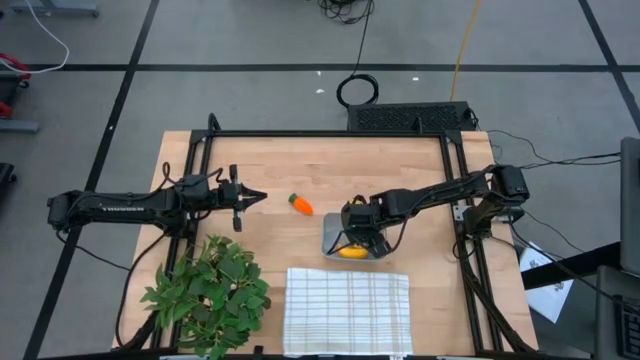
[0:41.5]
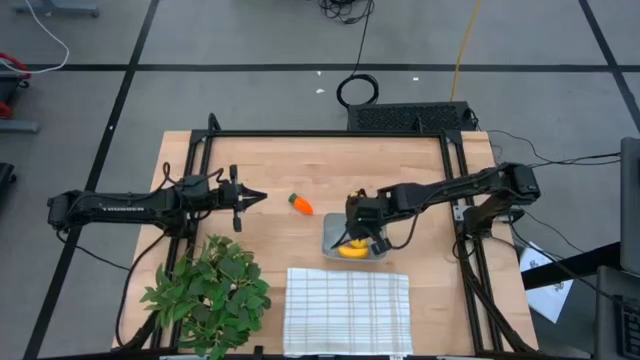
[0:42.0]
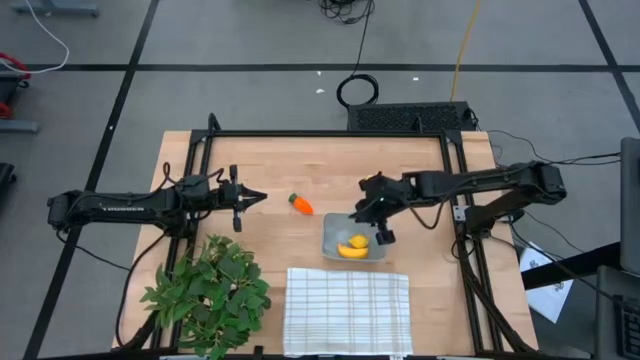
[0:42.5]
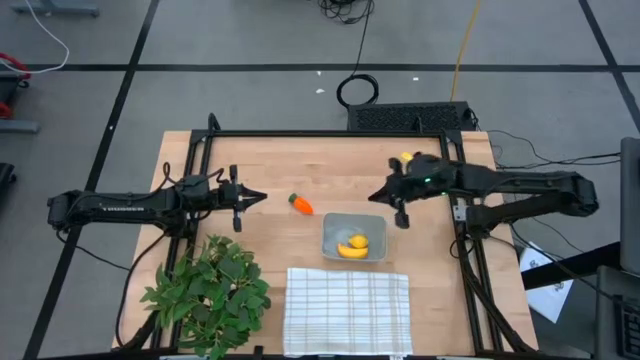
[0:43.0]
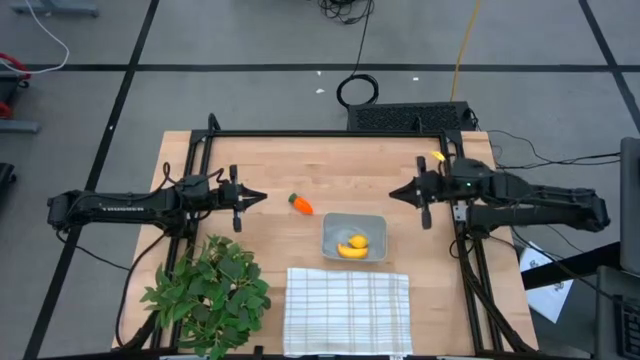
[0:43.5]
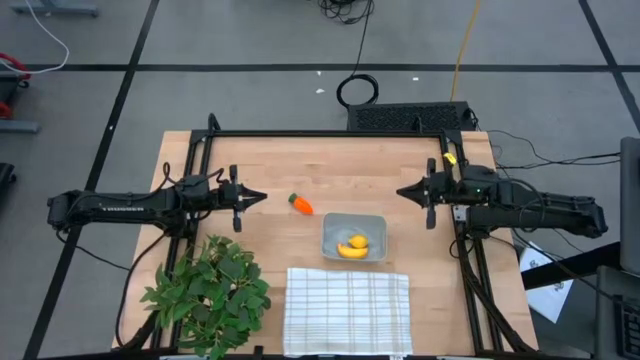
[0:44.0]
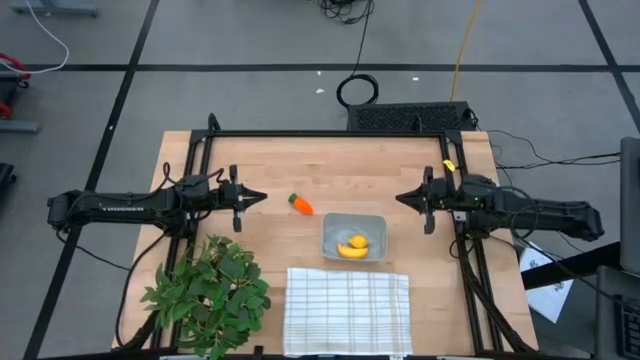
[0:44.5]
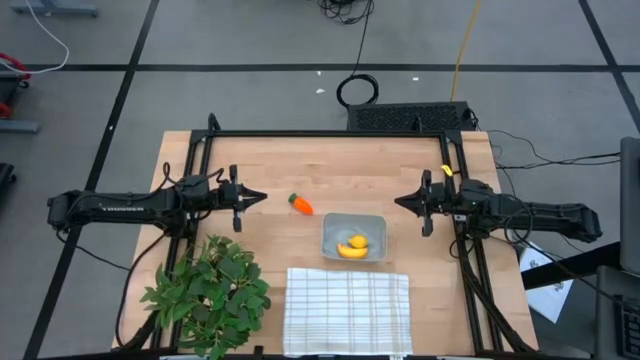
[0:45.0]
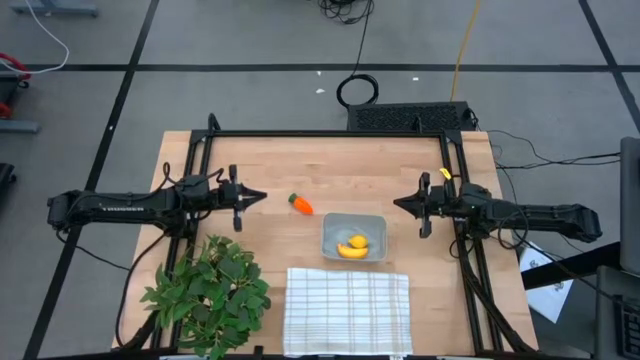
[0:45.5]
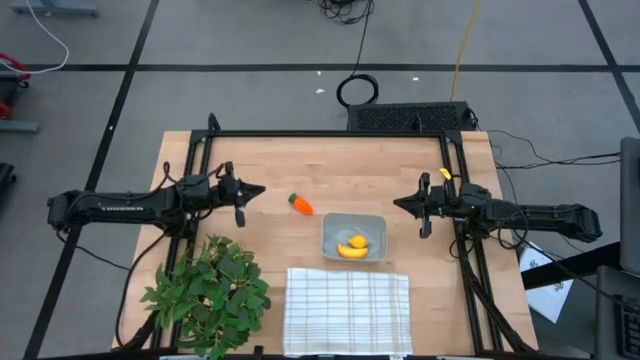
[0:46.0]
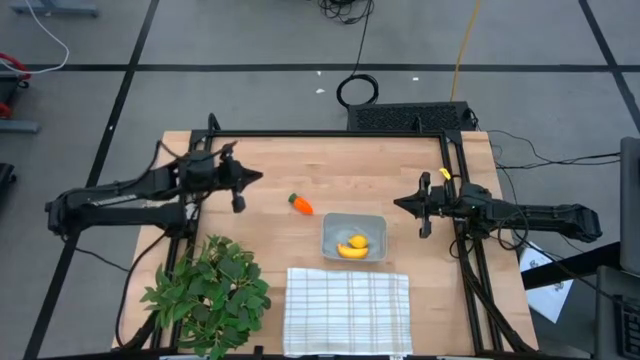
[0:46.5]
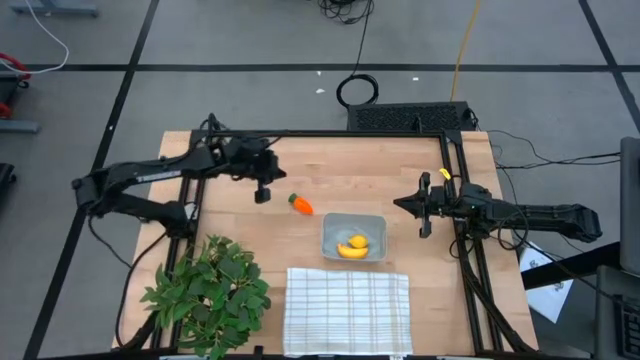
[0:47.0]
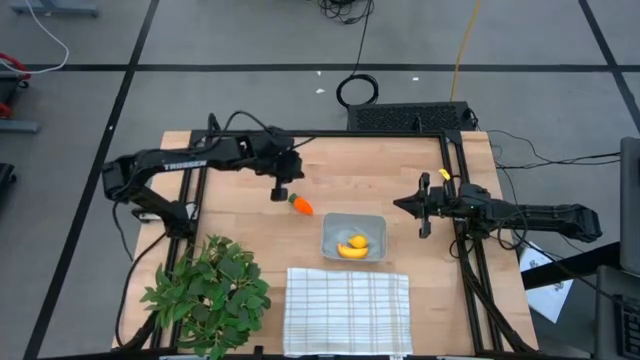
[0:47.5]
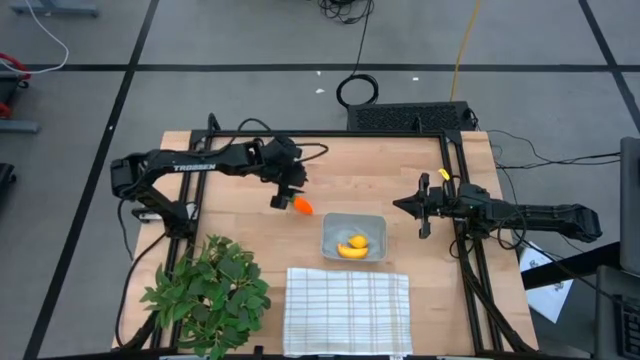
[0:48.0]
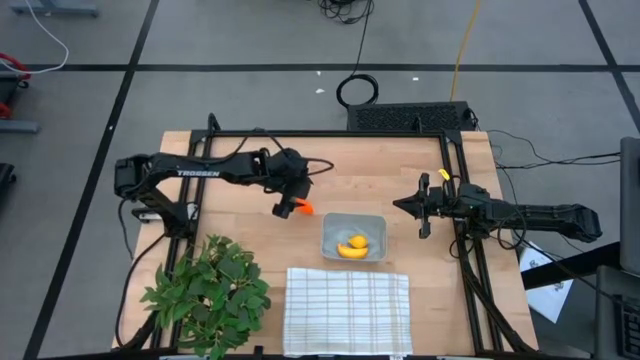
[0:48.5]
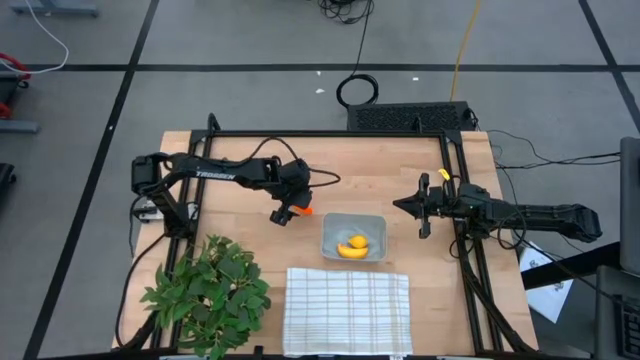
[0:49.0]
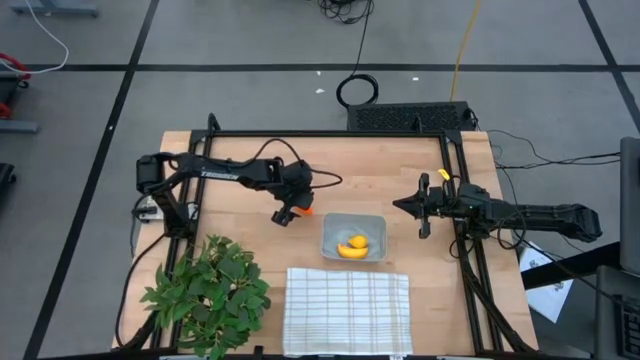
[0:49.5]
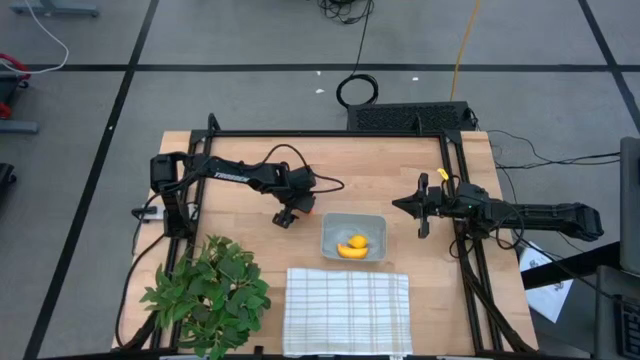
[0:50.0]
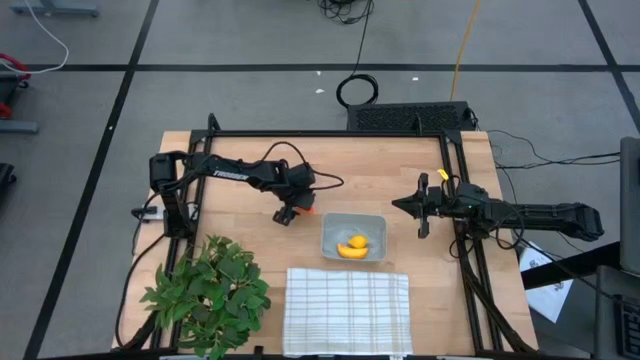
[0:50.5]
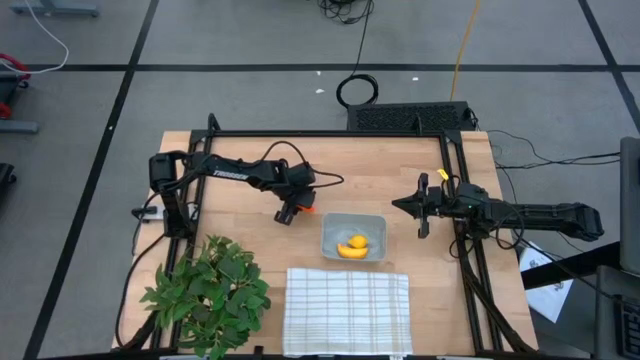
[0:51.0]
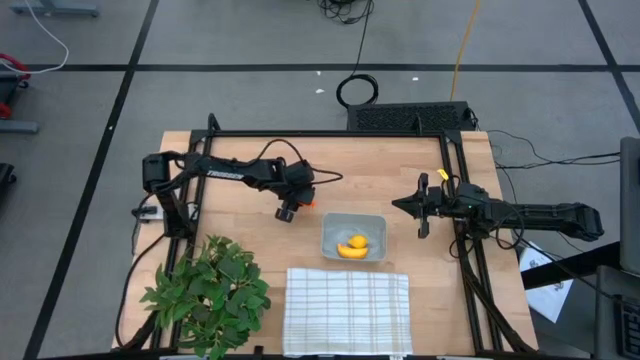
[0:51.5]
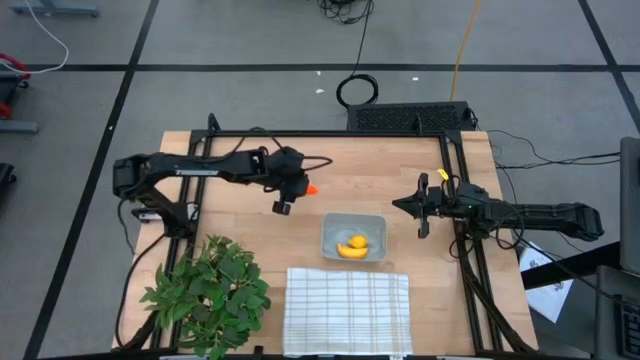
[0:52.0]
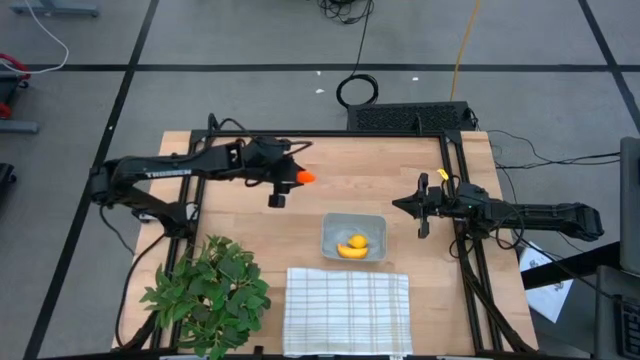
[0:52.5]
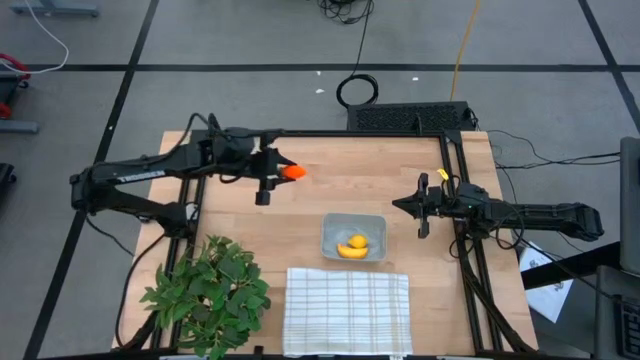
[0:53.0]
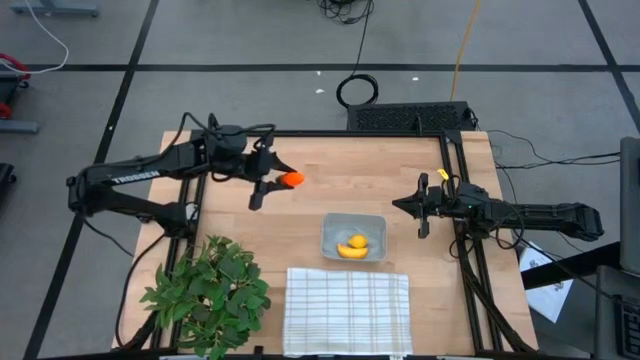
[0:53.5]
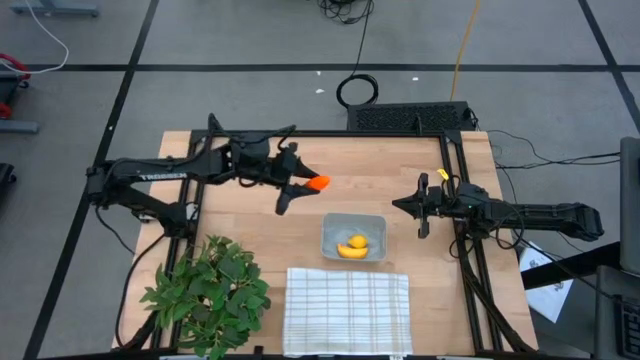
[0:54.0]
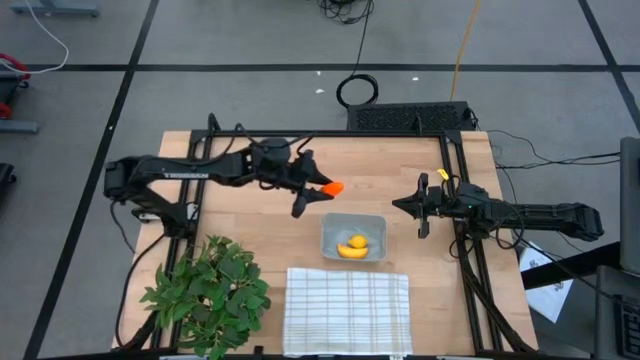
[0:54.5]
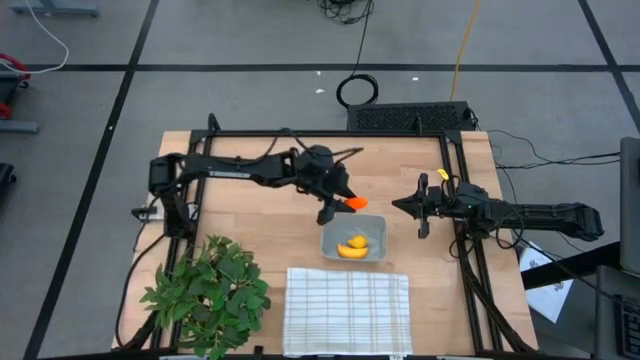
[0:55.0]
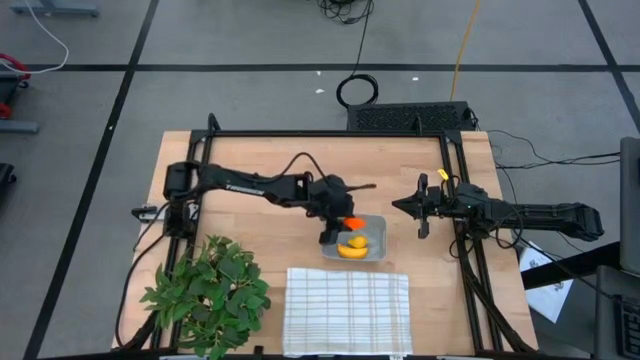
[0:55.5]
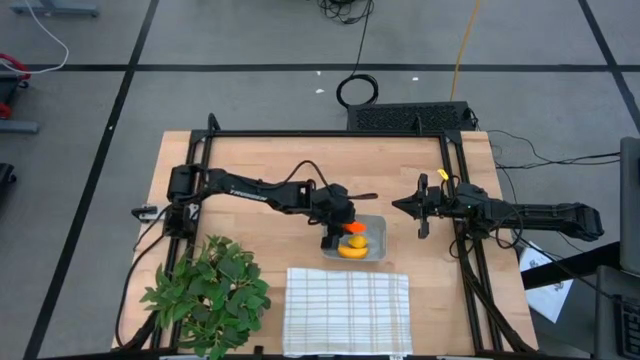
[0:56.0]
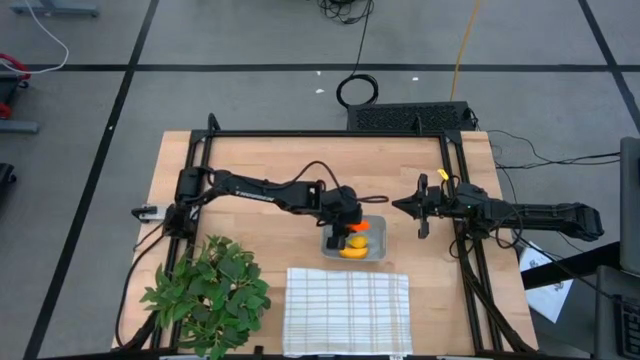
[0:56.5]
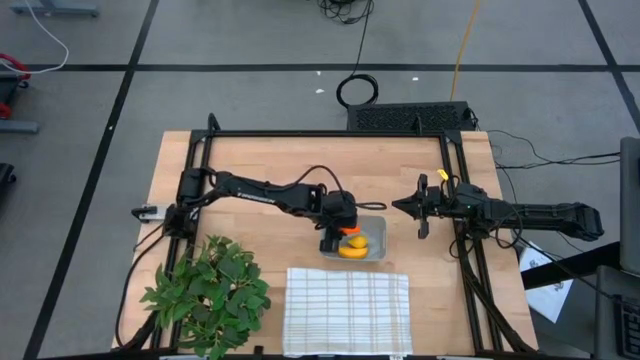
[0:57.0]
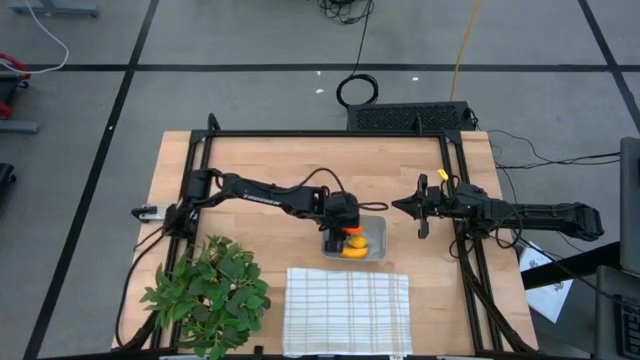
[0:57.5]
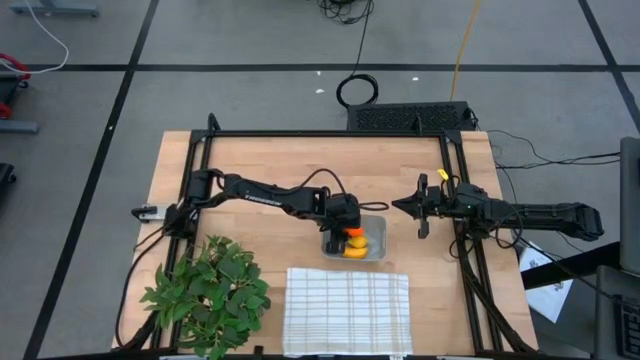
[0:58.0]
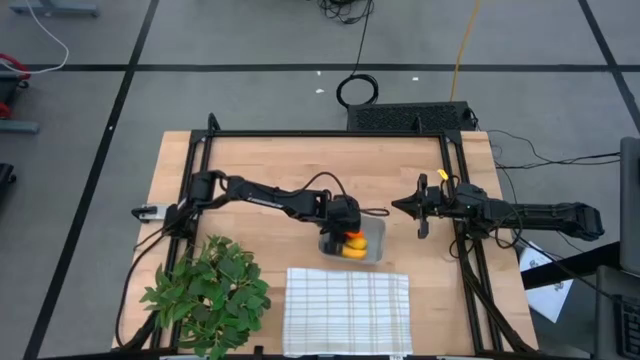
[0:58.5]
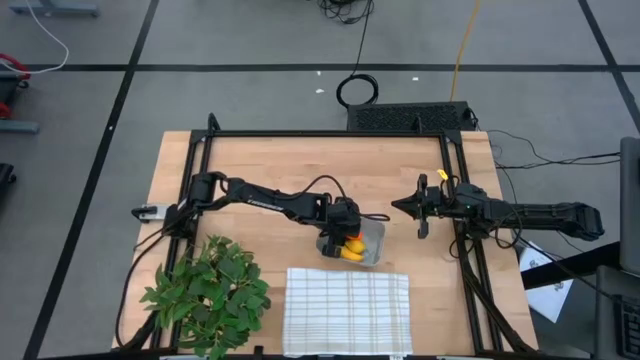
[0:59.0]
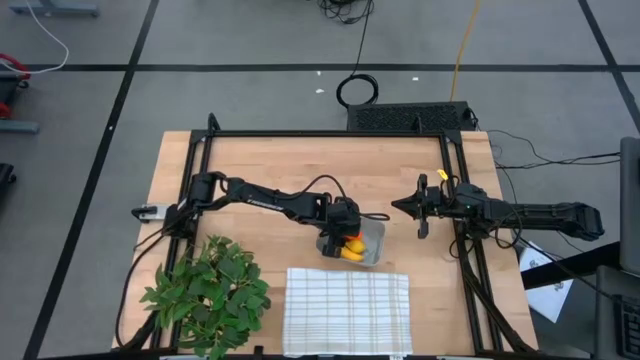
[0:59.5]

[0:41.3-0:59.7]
Task: Pick and placing Produce into tupperware
Put the orange carrot into the gray bin

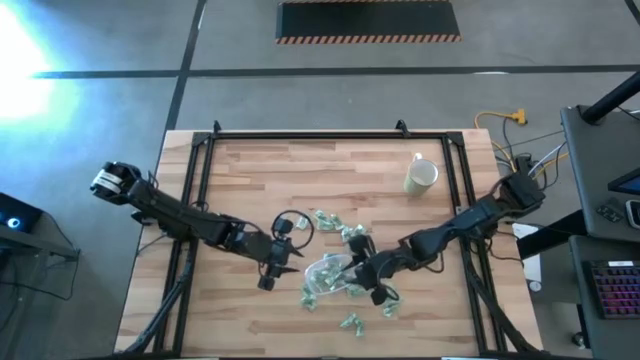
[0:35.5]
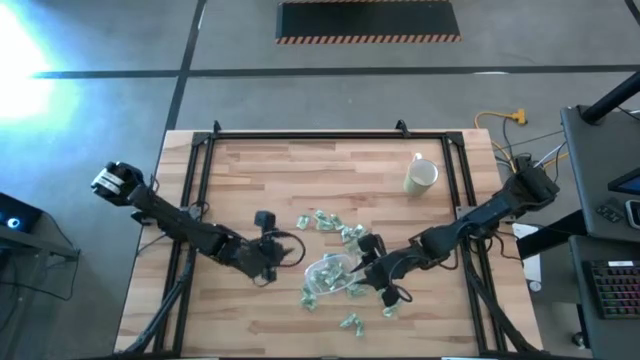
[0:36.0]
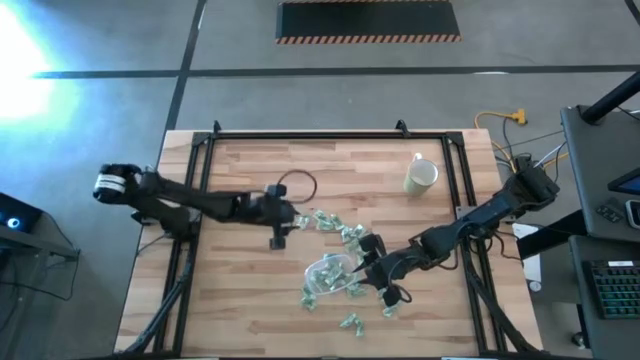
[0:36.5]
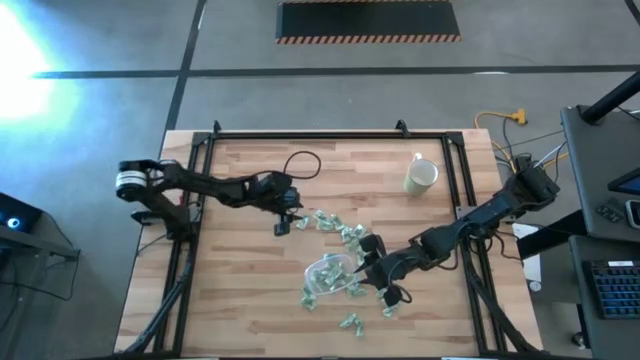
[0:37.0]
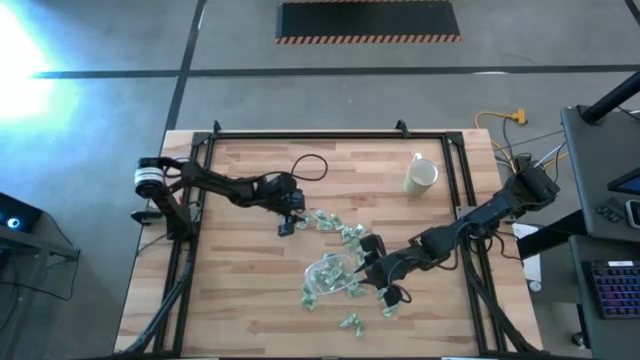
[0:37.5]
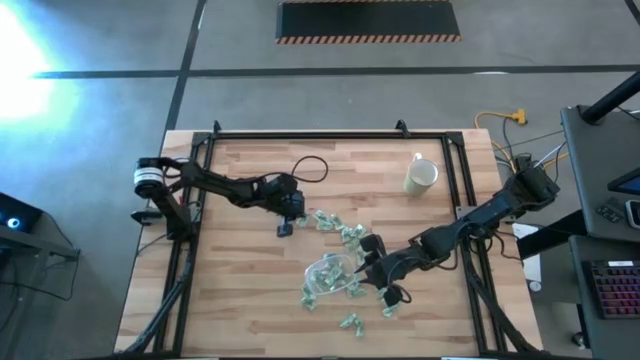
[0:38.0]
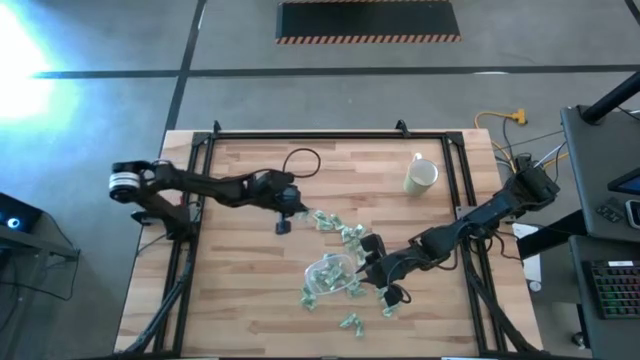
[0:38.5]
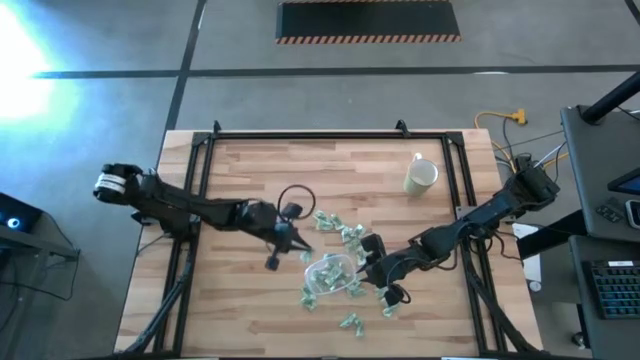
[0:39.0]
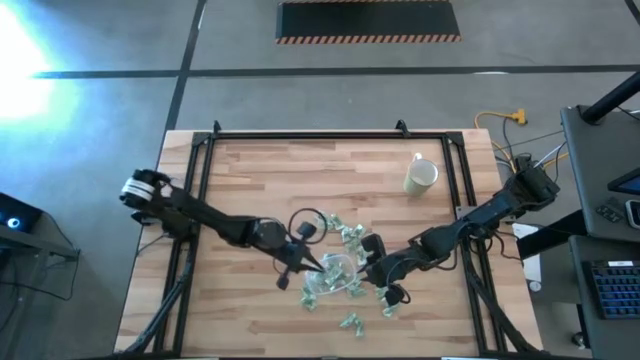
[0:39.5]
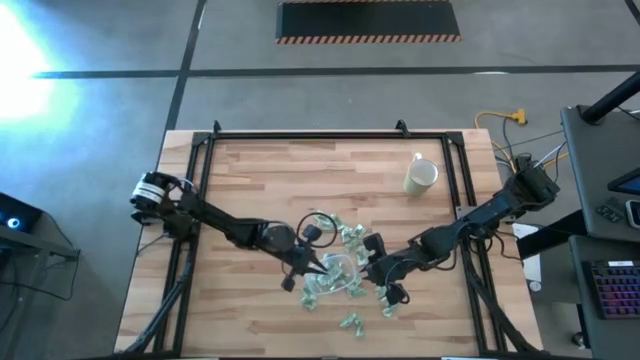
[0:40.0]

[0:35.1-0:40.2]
Task: Pick and place items into bin
Put the Stevia packet into the transparent bin
